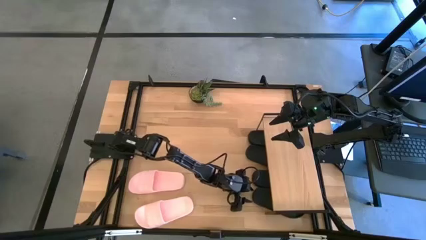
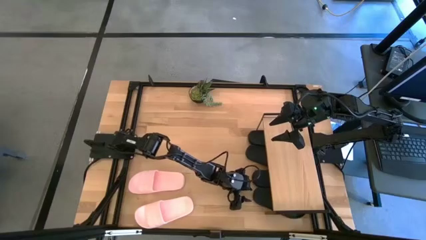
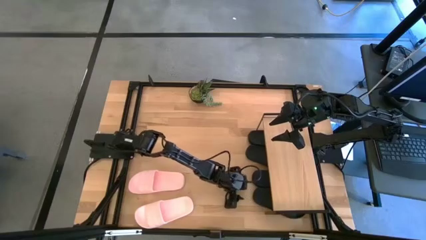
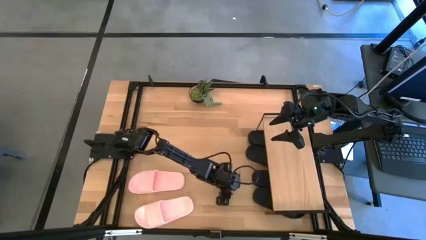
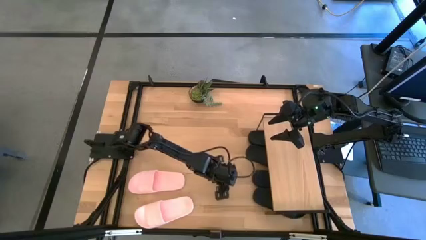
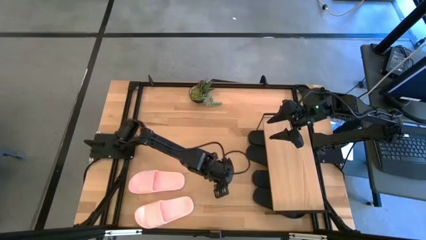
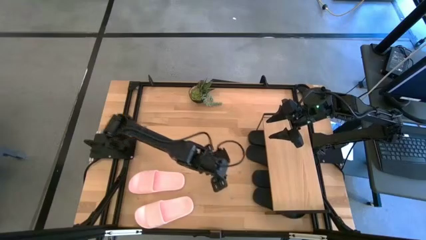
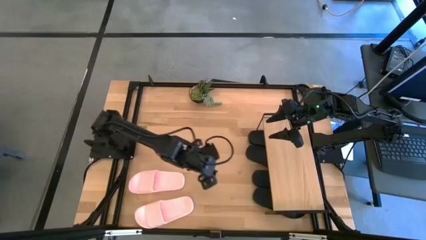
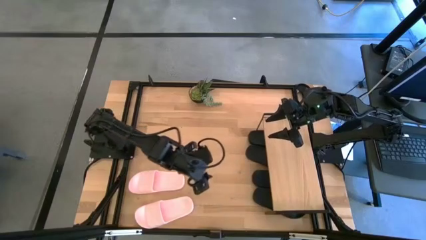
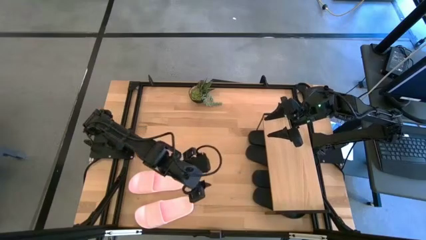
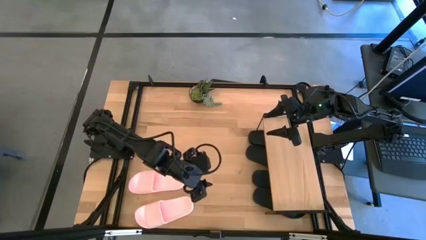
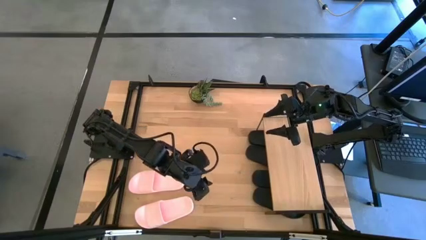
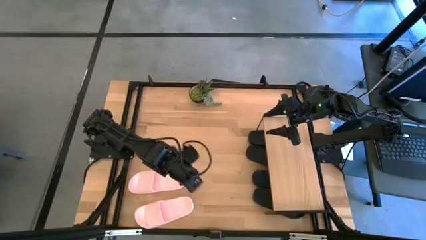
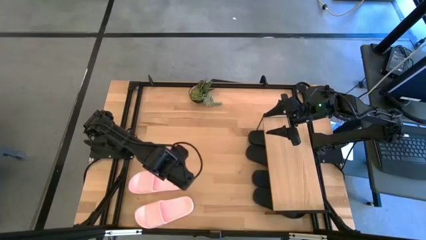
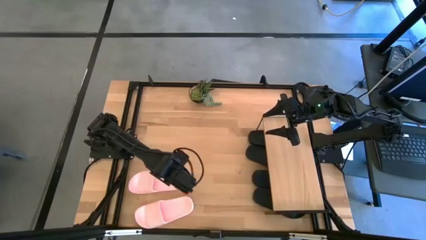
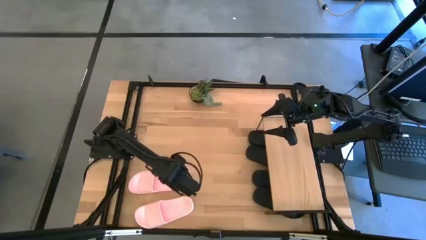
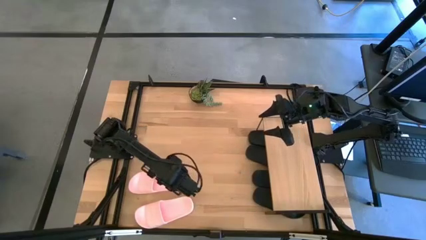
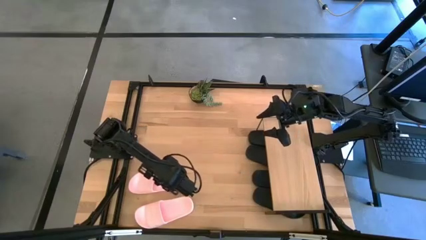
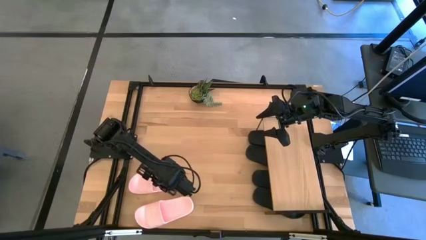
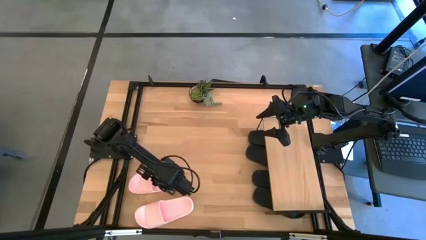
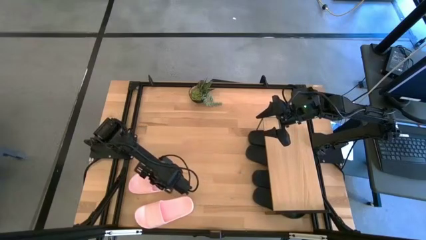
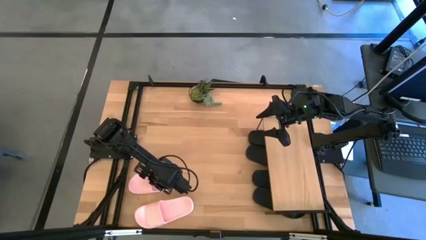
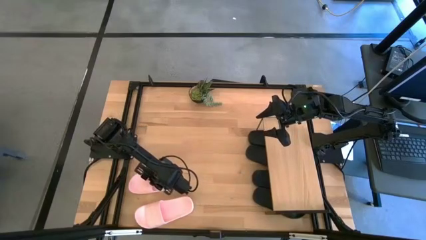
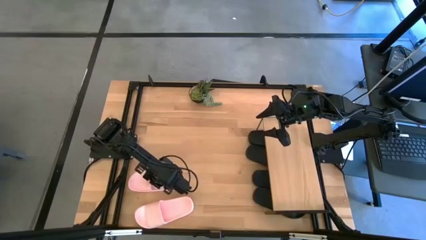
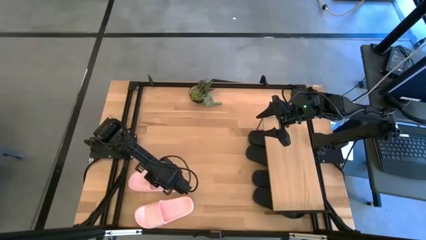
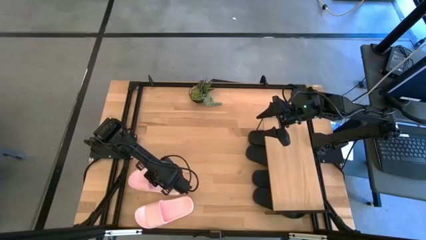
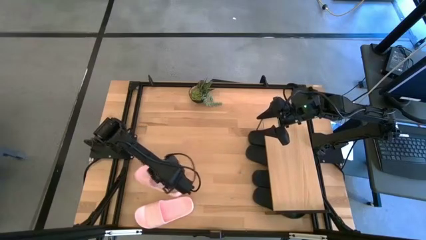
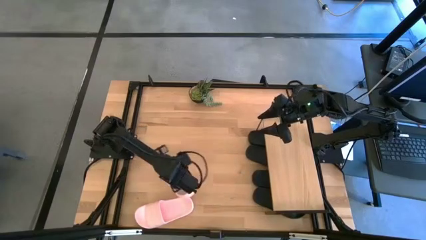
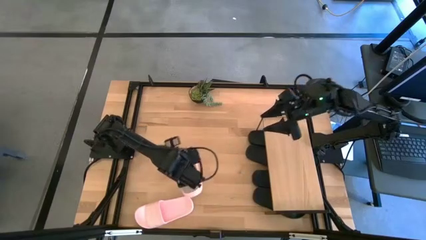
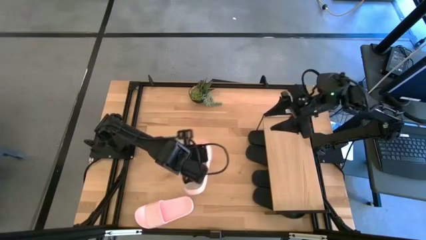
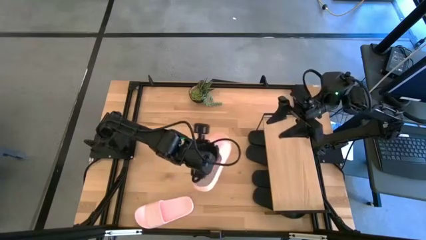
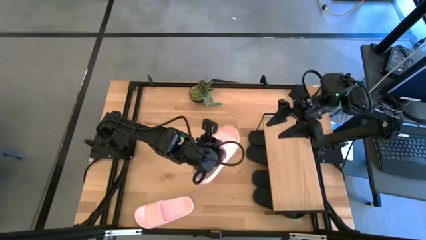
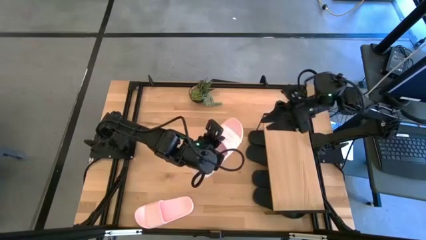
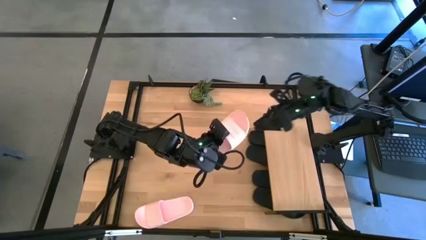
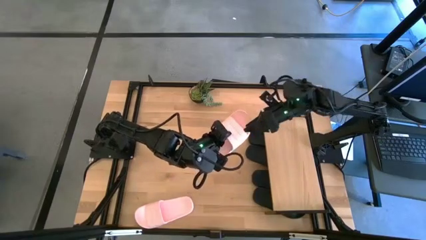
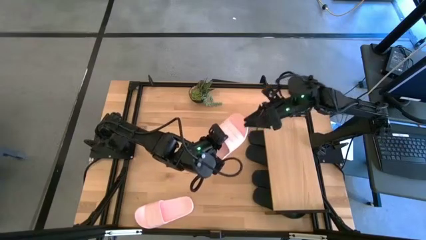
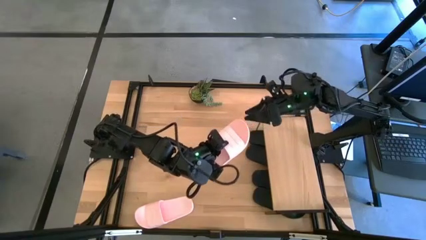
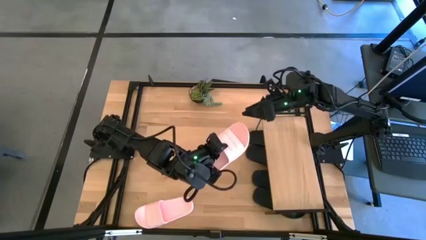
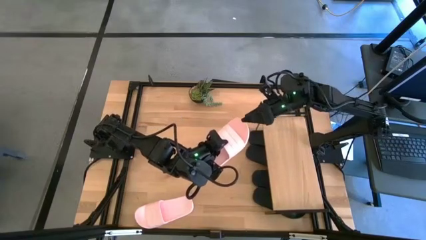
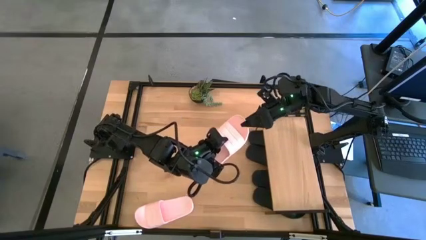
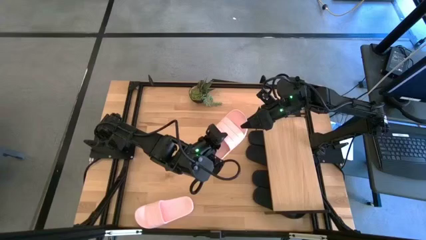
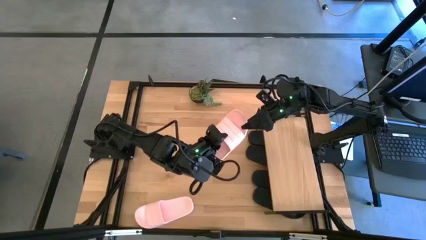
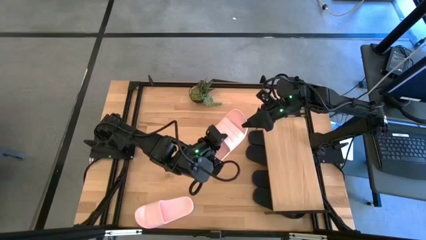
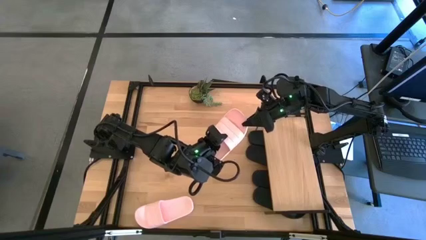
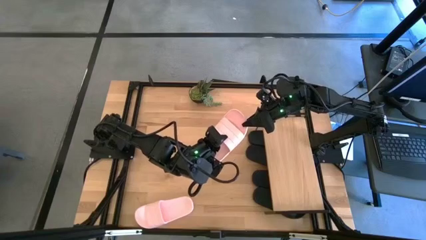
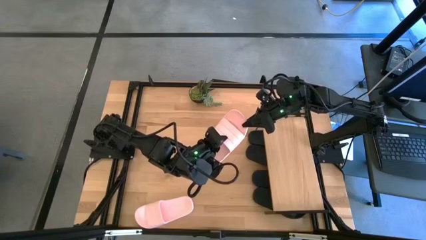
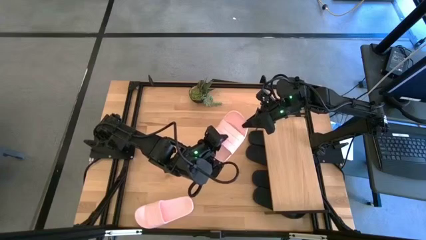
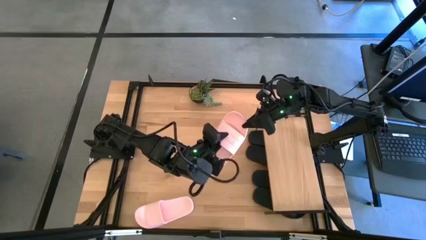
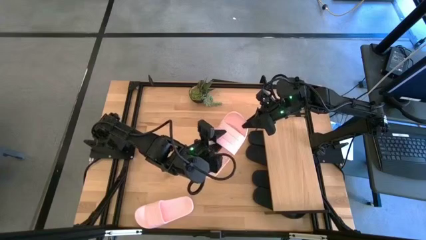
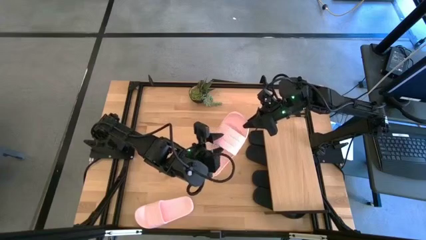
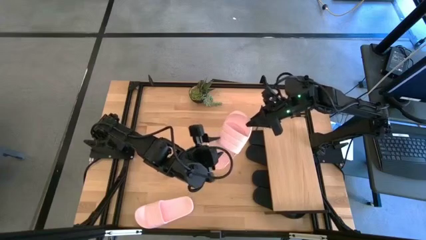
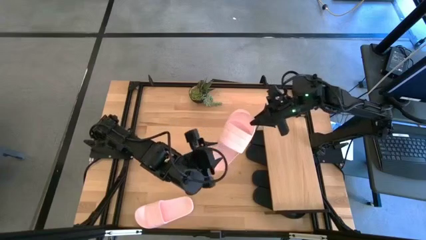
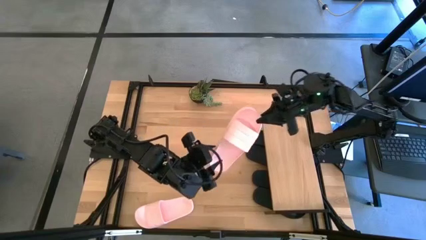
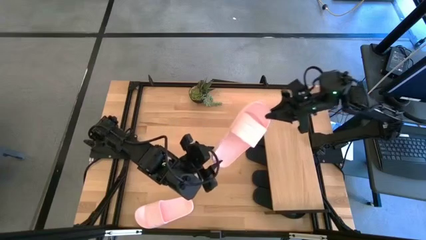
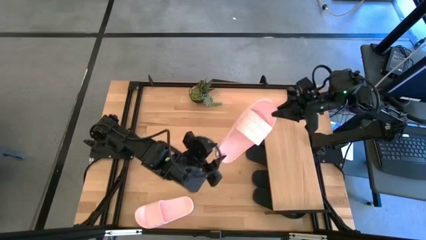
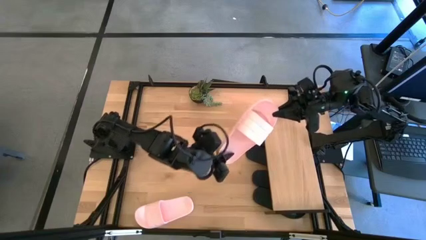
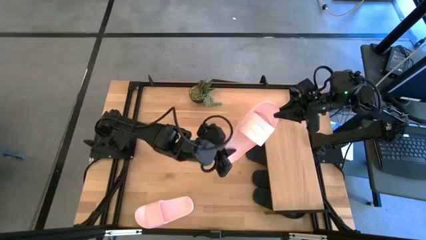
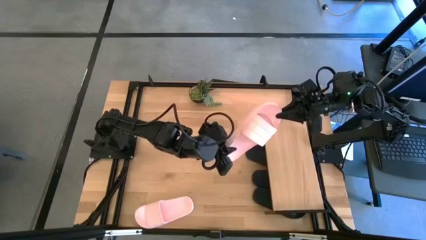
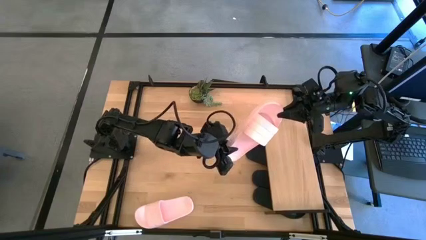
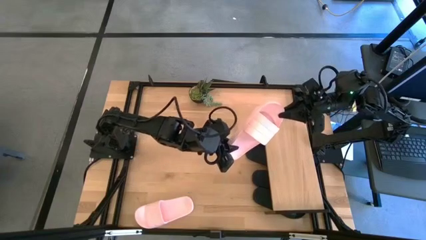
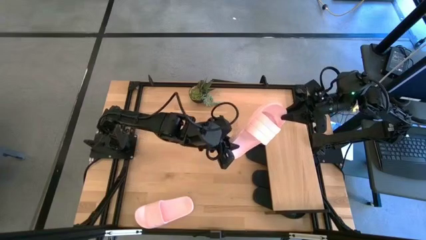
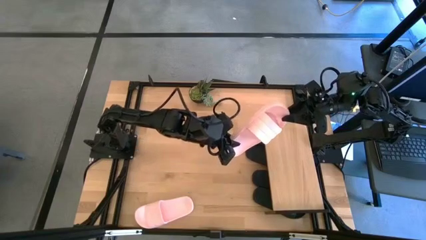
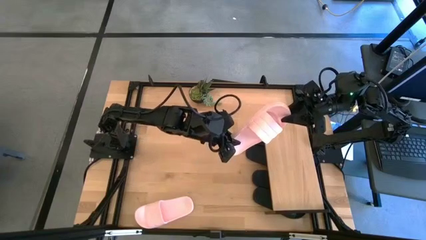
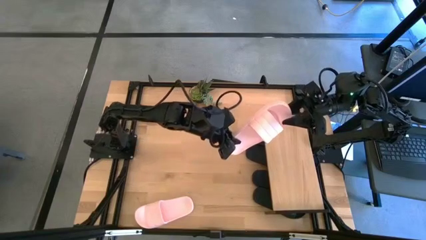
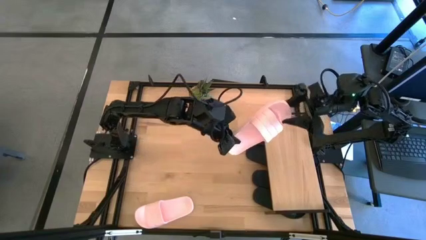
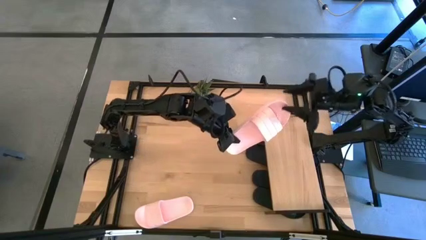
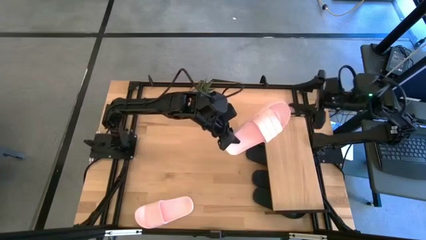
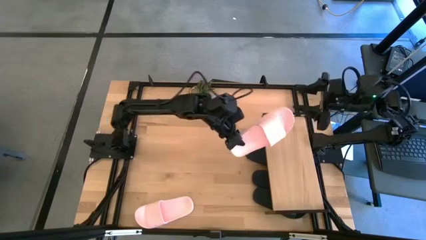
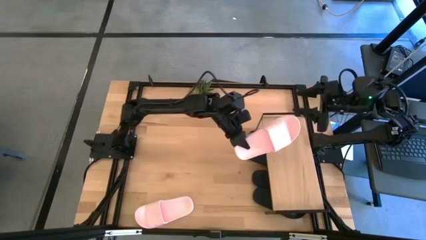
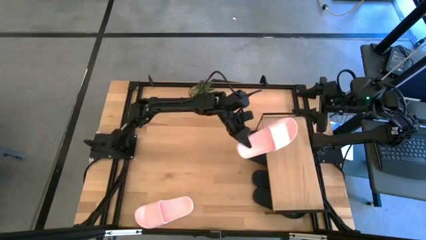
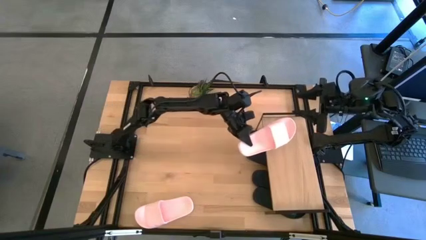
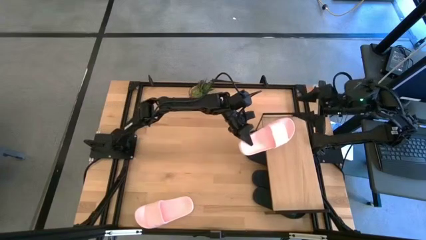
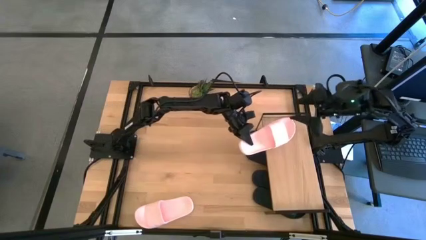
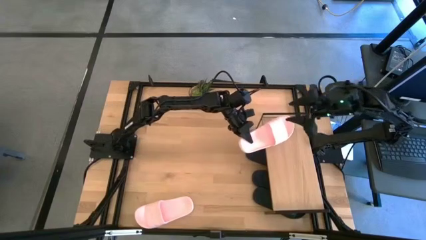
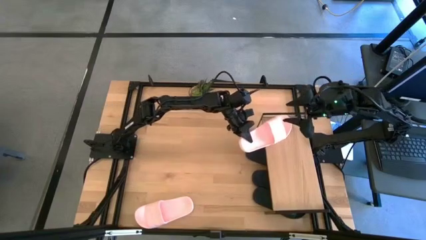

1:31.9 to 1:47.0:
Task: Pick and place slides into the shelf
Put the top pink slides on the shelf
